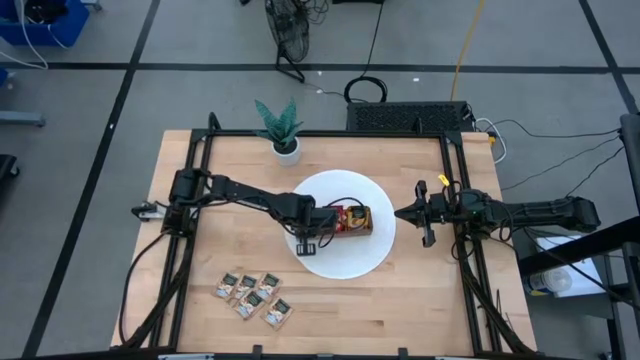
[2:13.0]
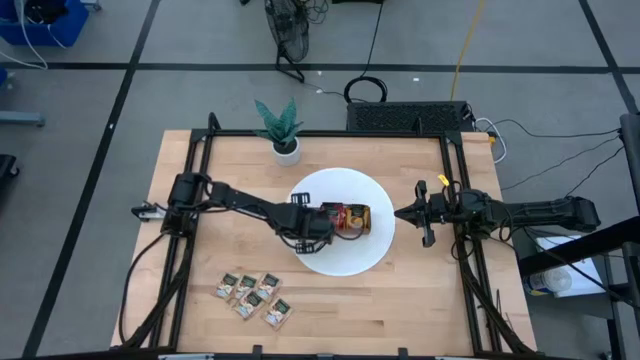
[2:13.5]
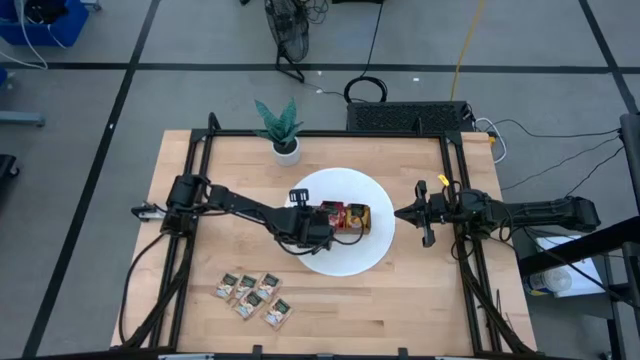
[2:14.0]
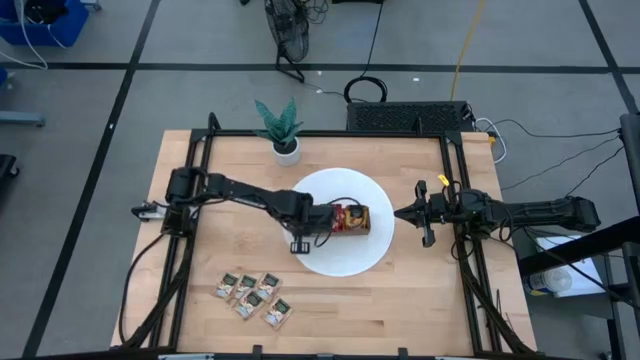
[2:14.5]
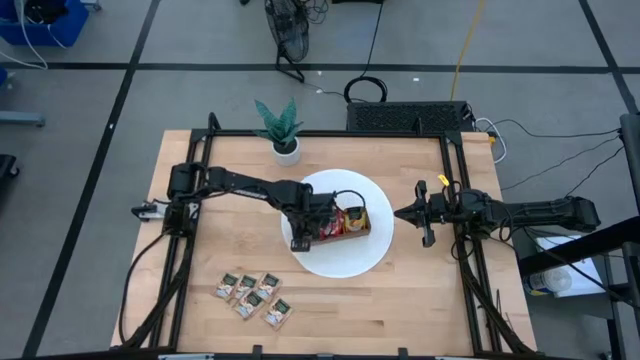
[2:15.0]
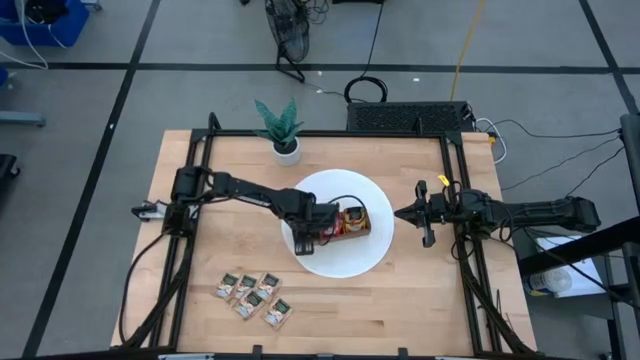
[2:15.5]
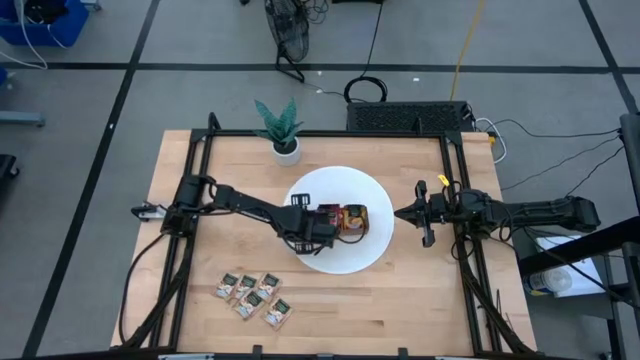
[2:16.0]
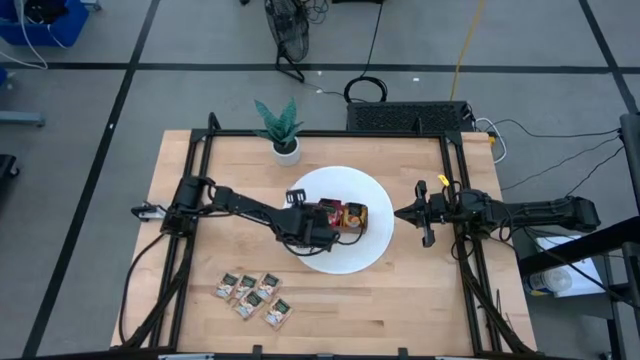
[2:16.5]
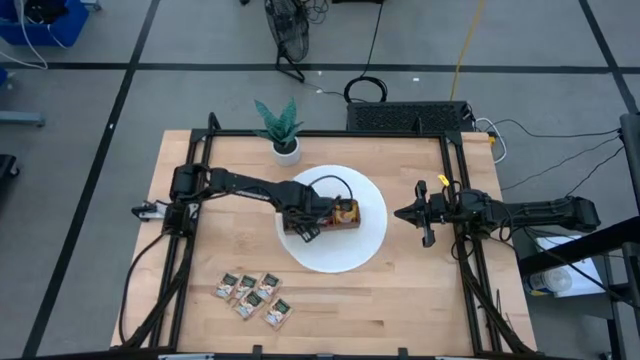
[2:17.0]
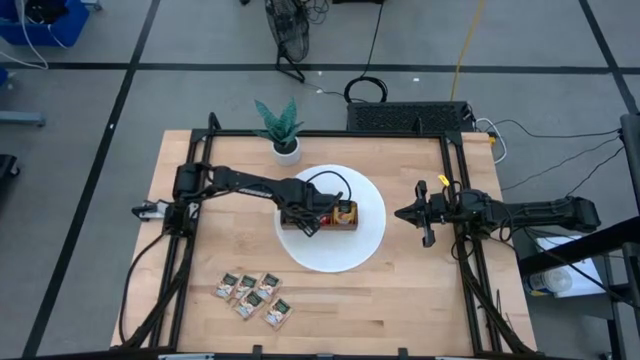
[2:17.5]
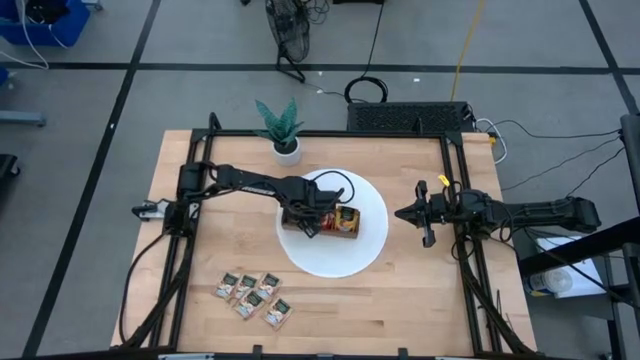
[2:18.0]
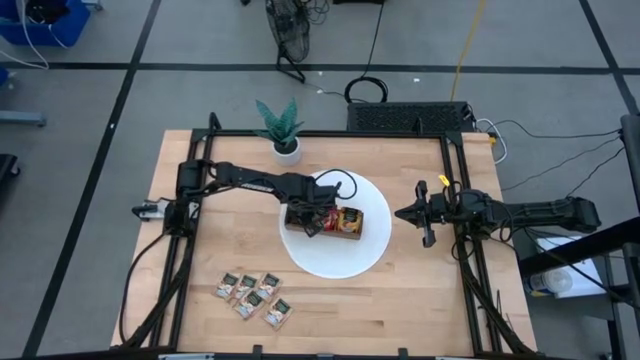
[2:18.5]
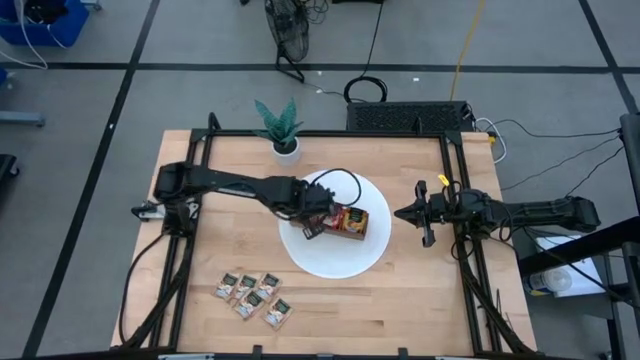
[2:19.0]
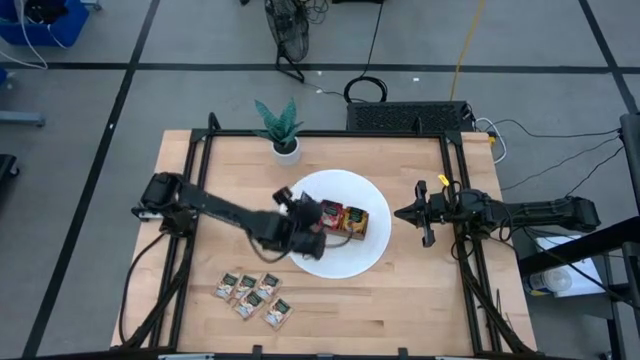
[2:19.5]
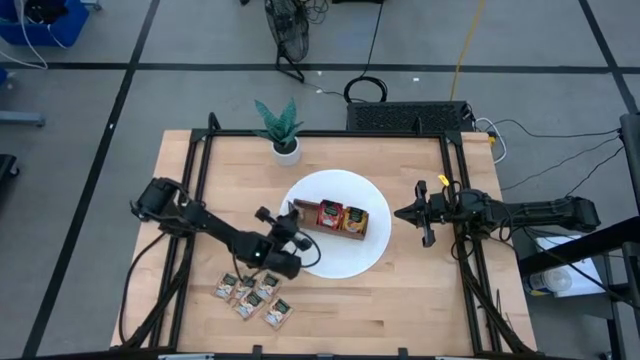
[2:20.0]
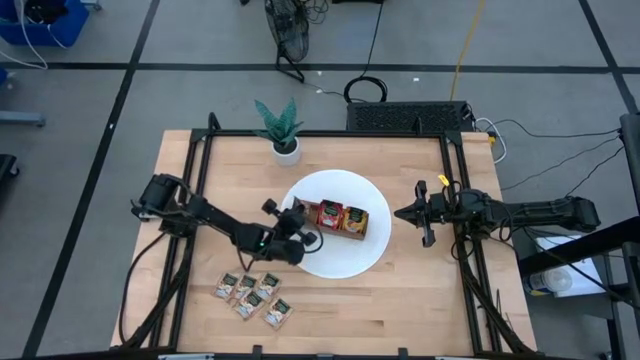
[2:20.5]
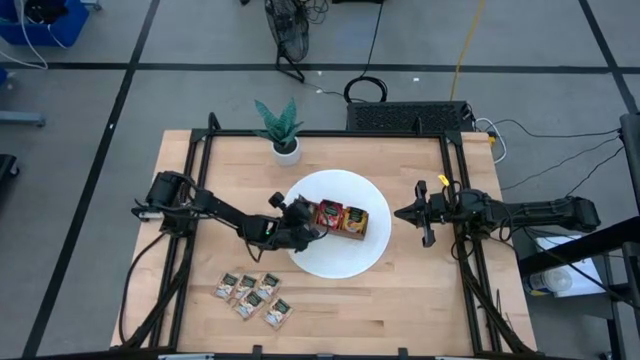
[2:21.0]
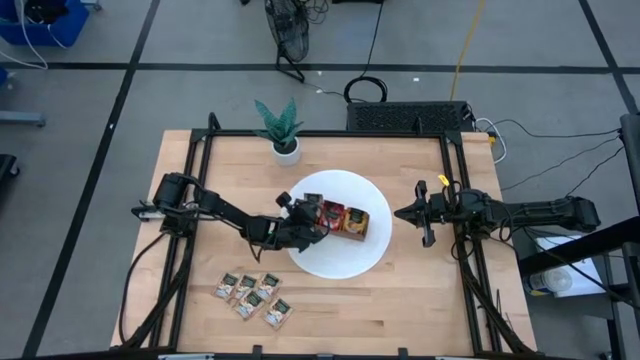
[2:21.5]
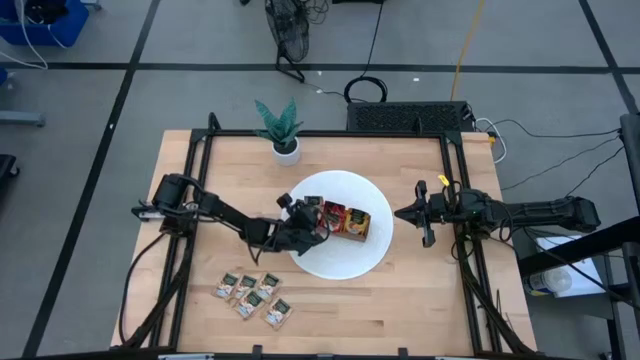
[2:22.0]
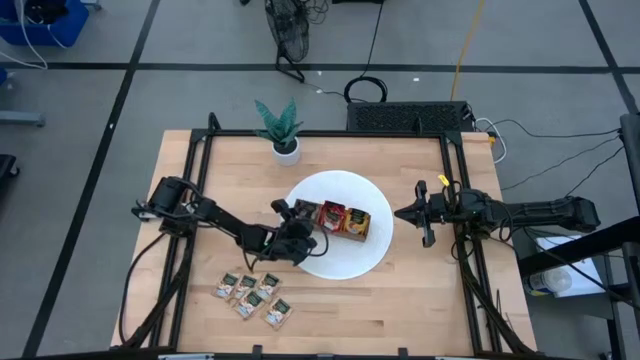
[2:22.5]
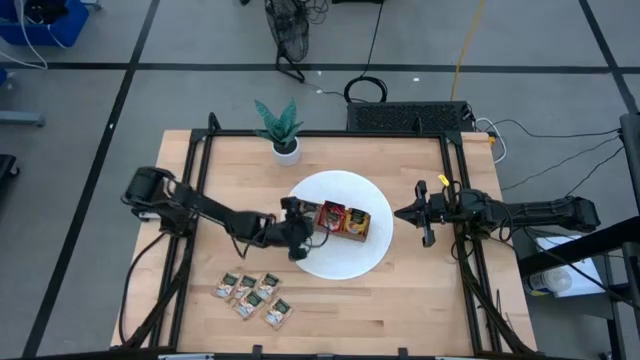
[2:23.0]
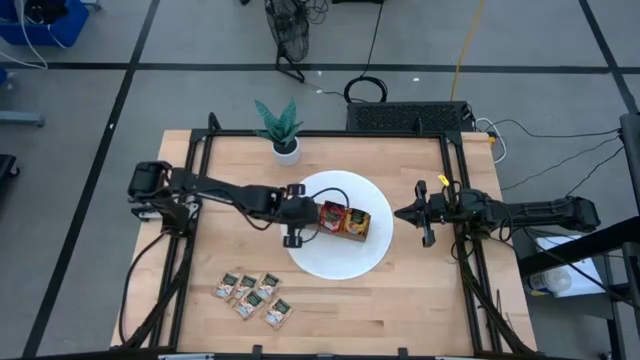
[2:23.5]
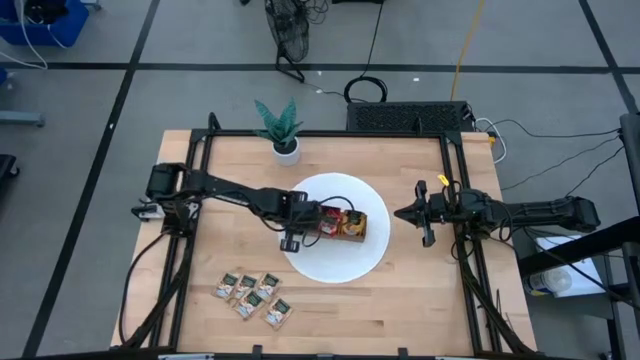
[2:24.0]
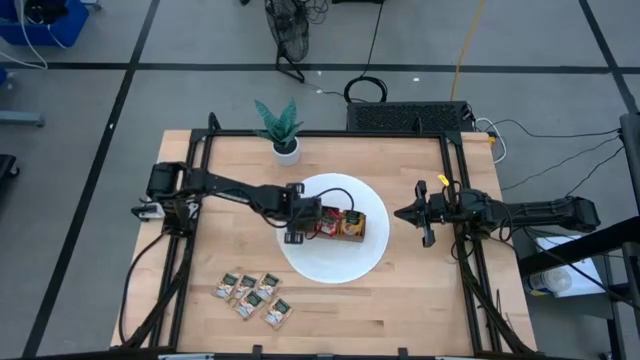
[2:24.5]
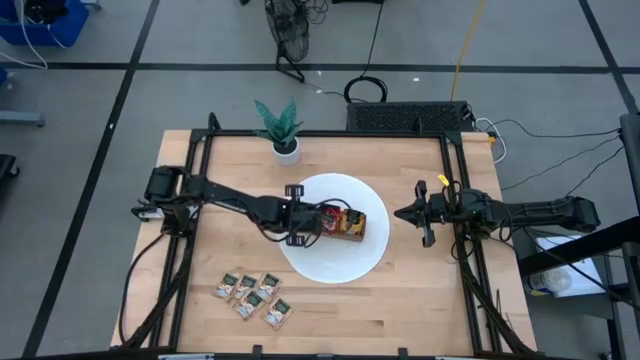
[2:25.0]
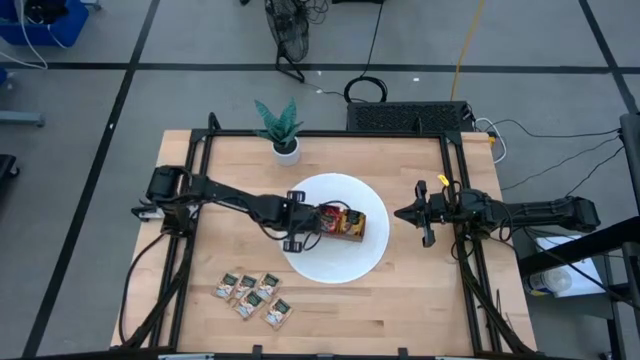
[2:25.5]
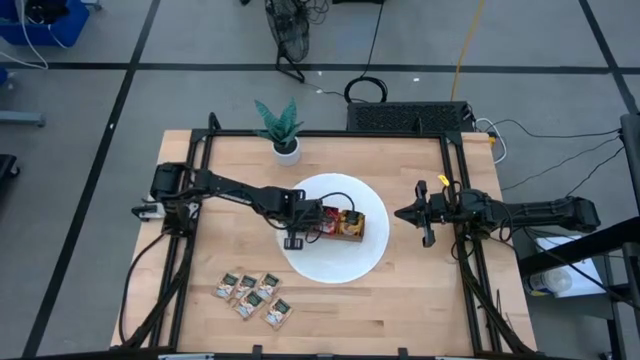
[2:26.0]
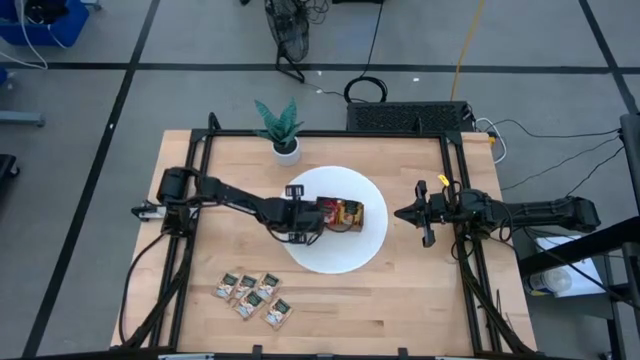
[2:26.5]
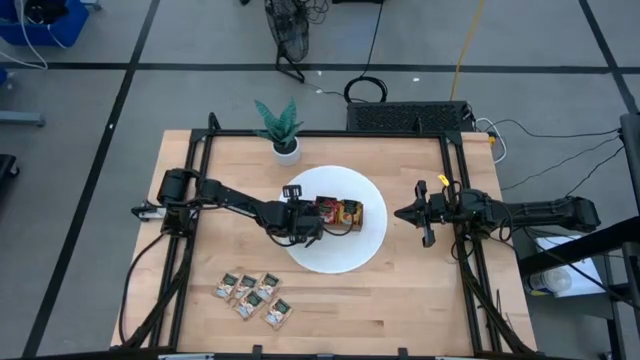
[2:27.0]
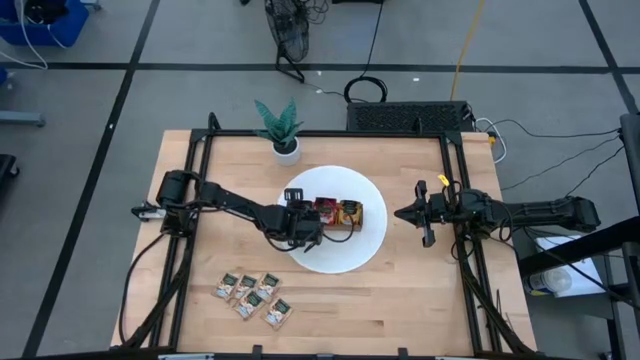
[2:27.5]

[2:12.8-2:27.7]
Task: Pick & Place Tea
Put the brown tea bag into the left section of the wooden organizer
